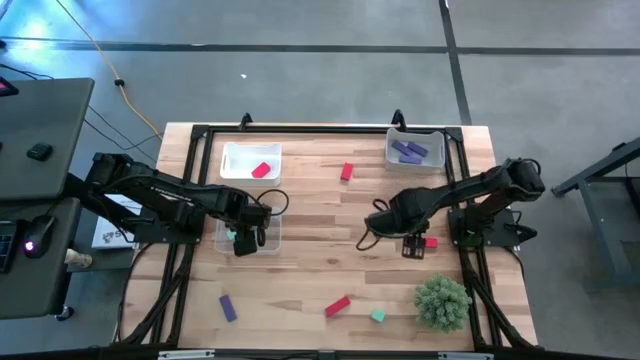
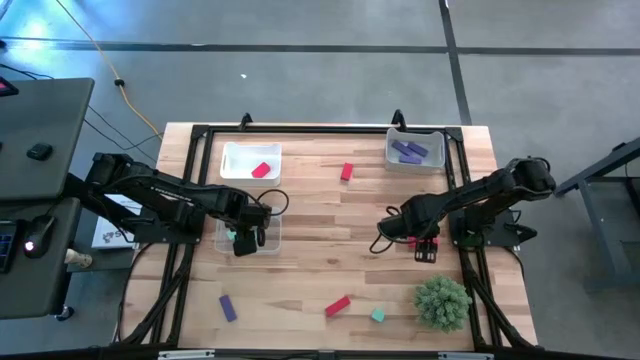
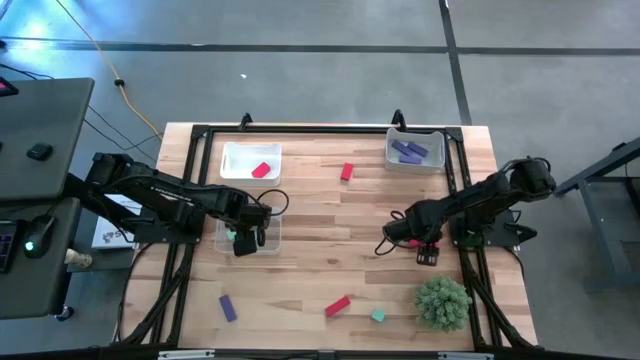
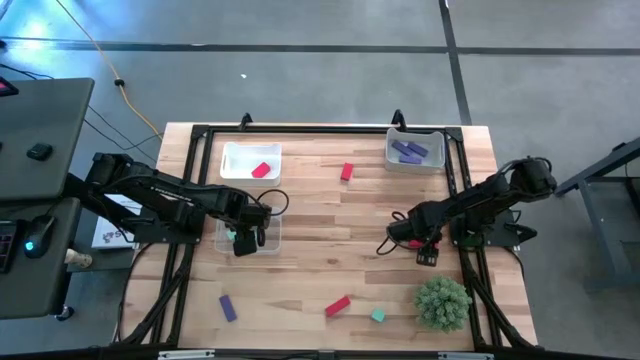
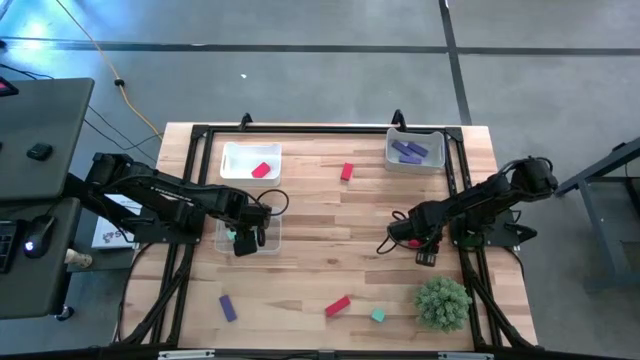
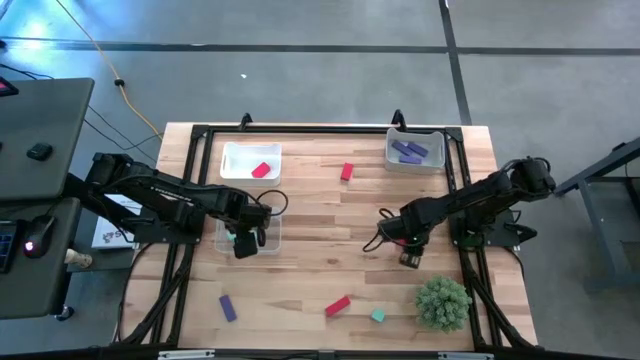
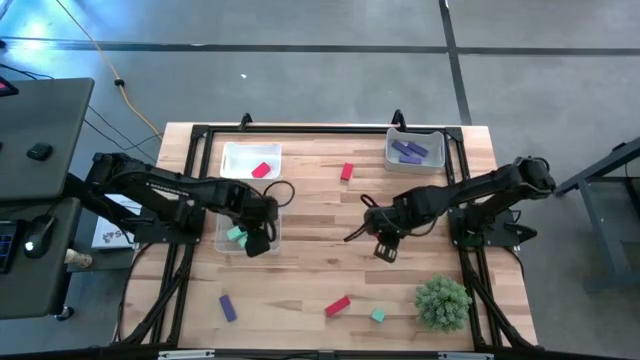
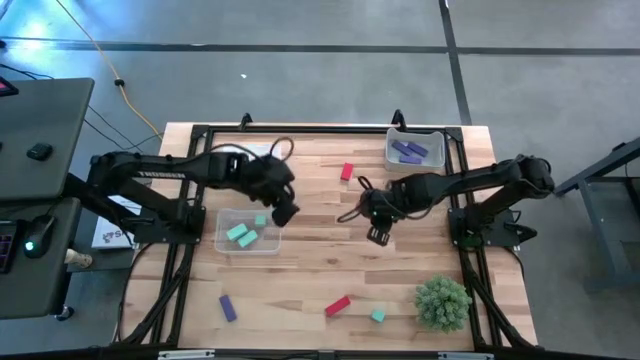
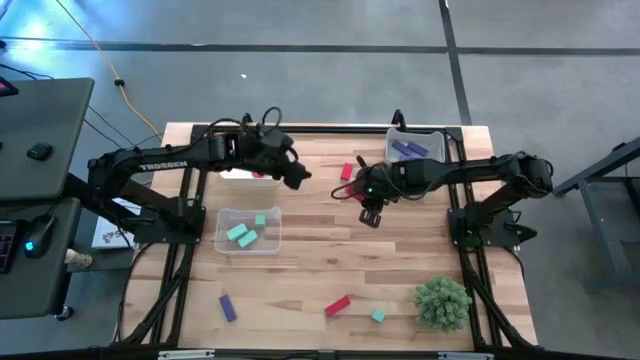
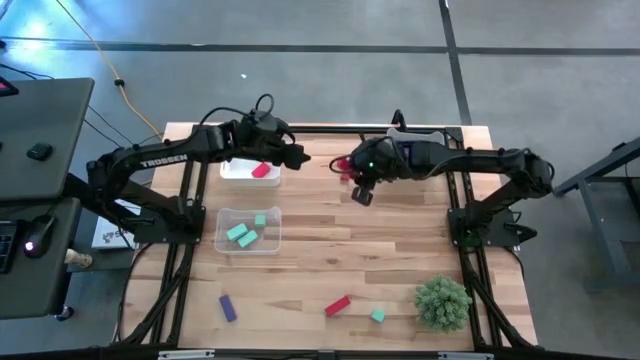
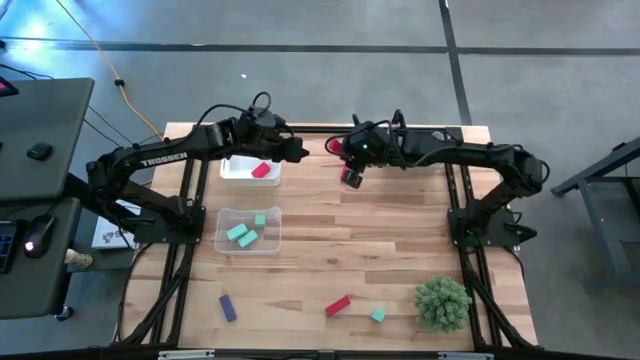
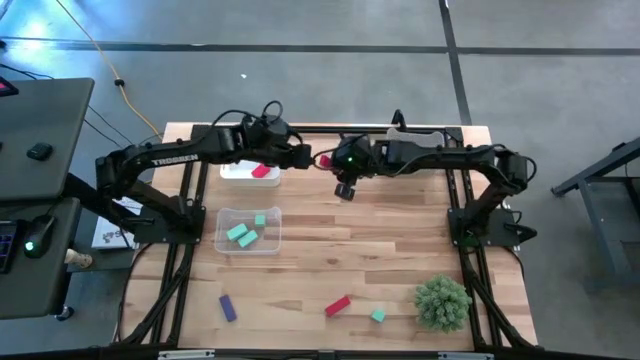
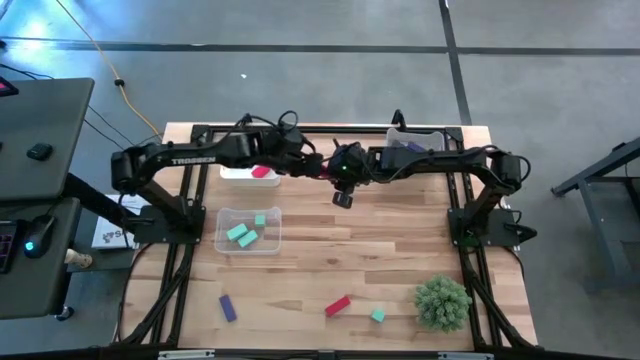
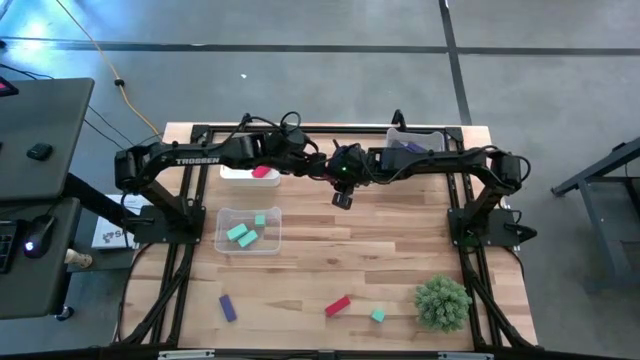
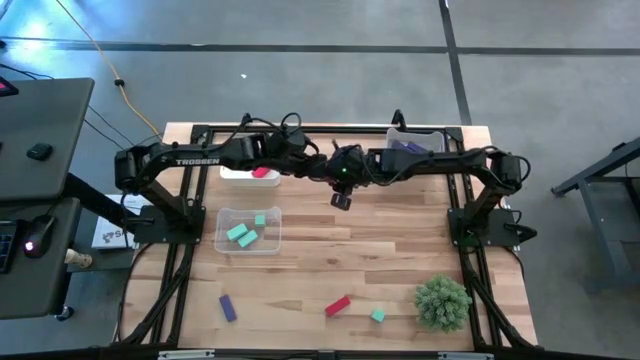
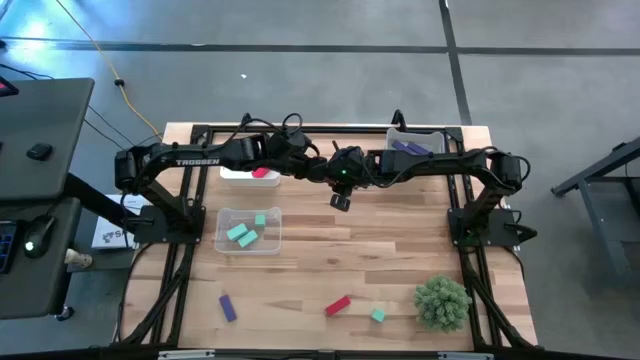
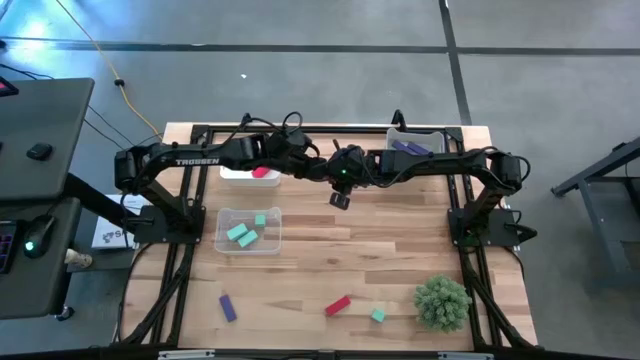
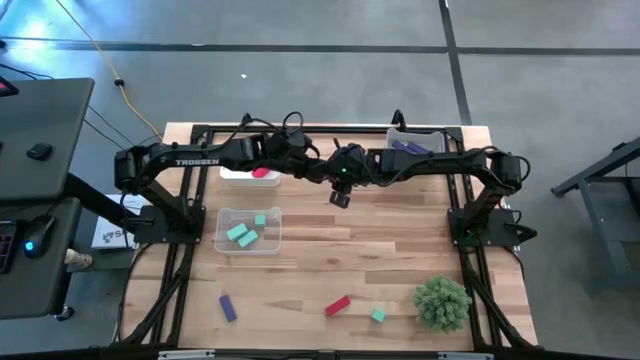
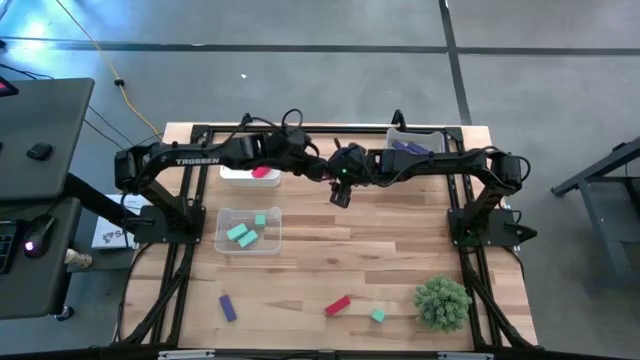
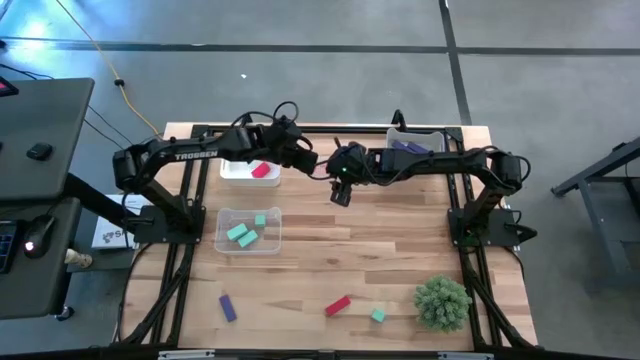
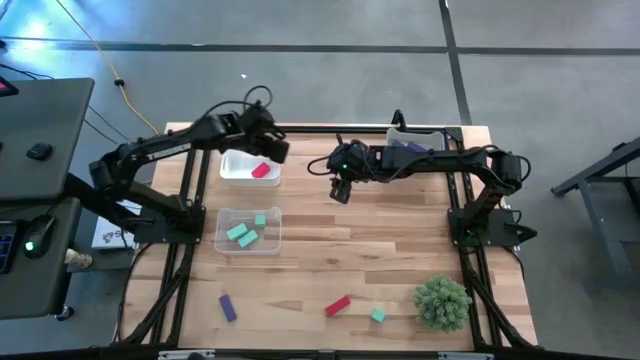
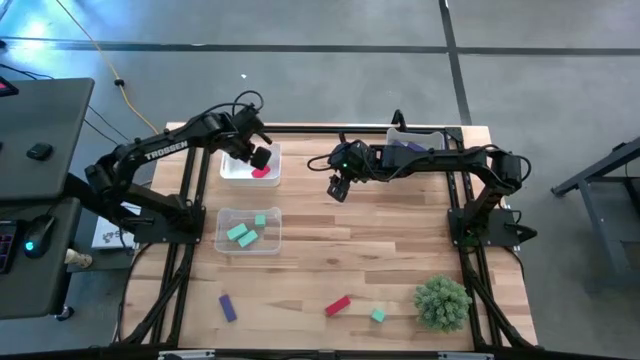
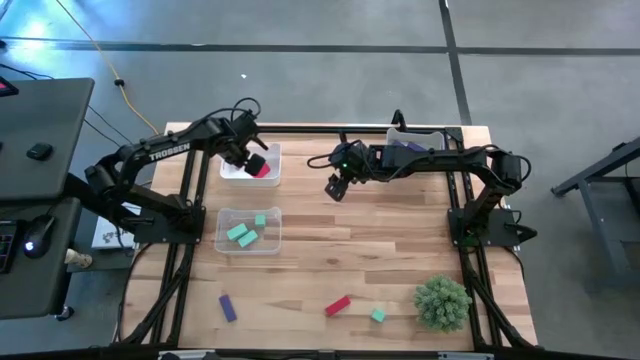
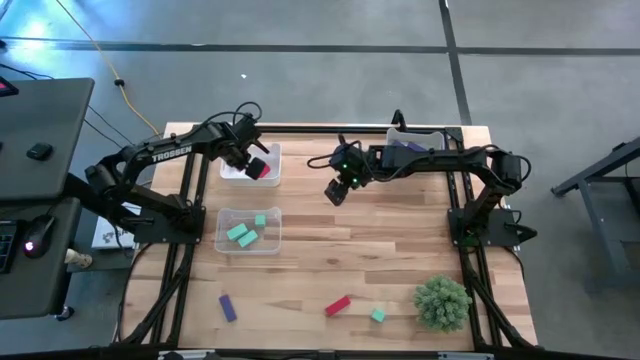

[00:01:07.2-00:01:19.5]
Task: Sort & place blocks by color
Put the red block into the white bin

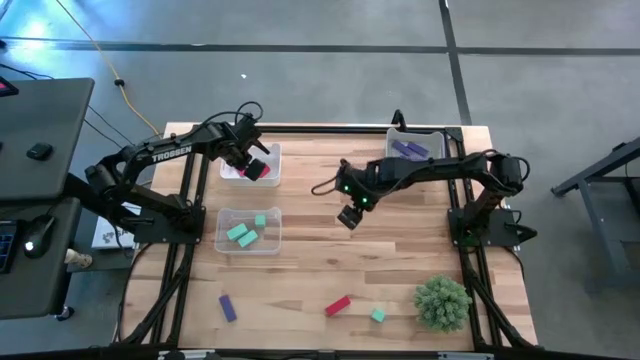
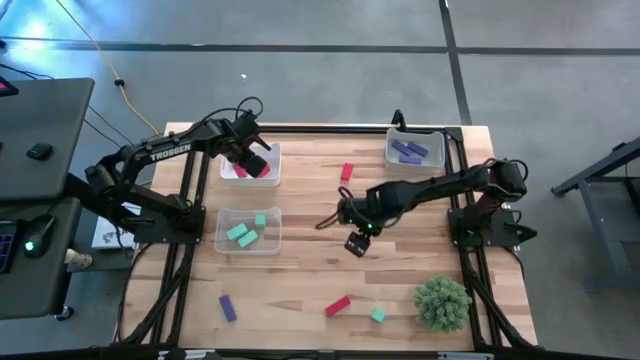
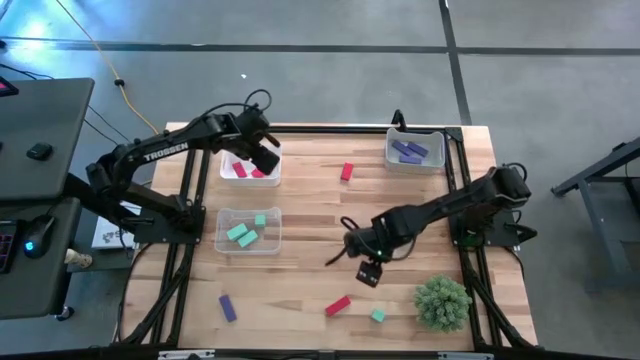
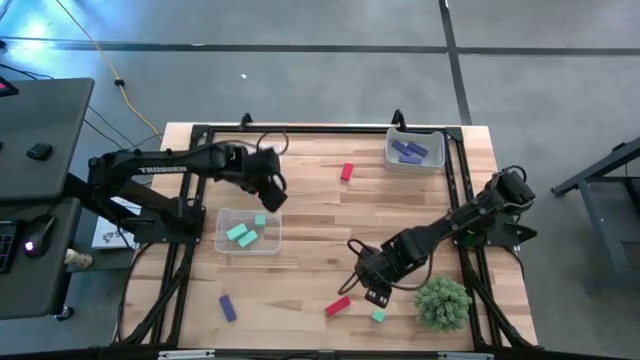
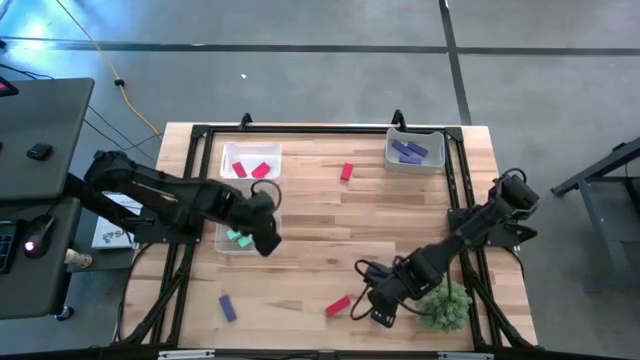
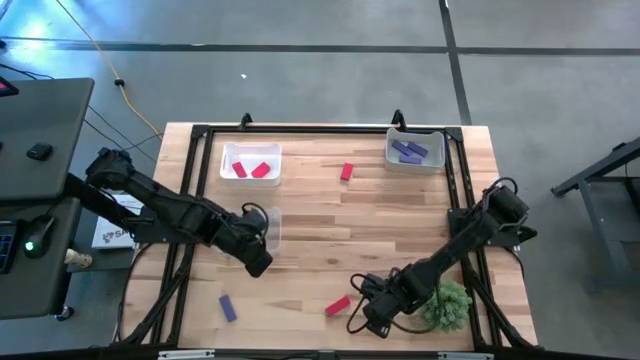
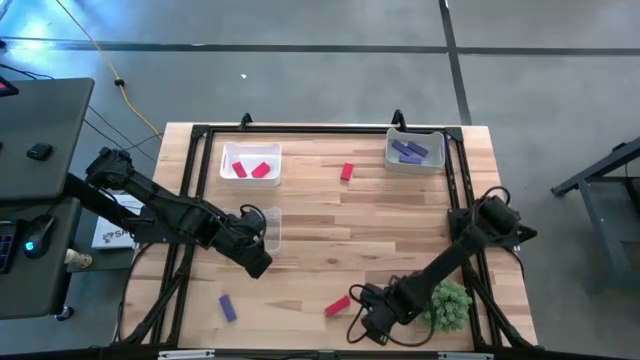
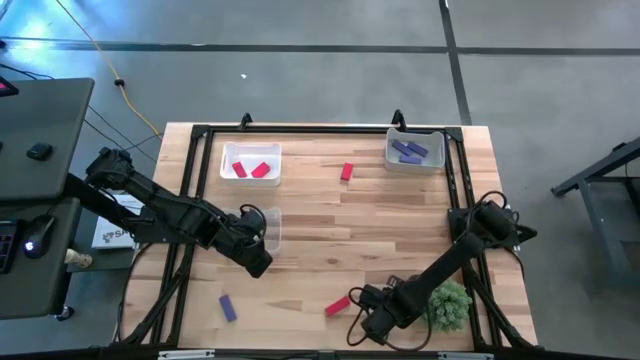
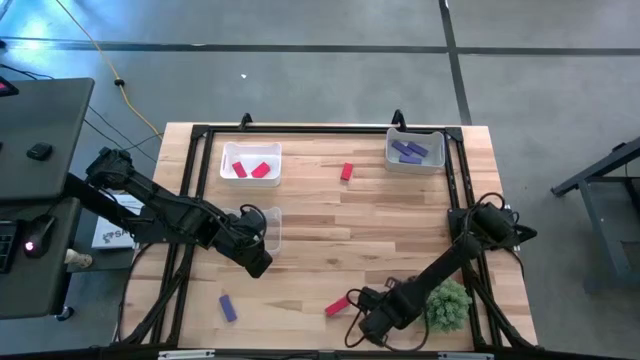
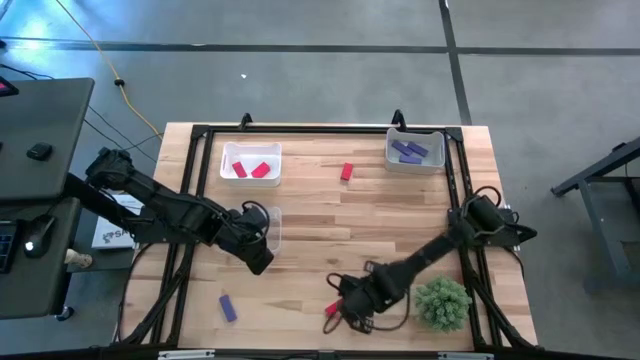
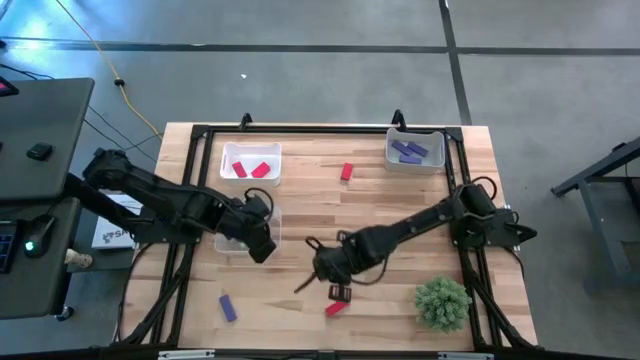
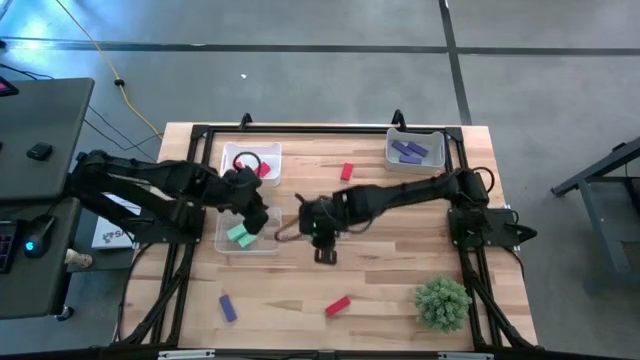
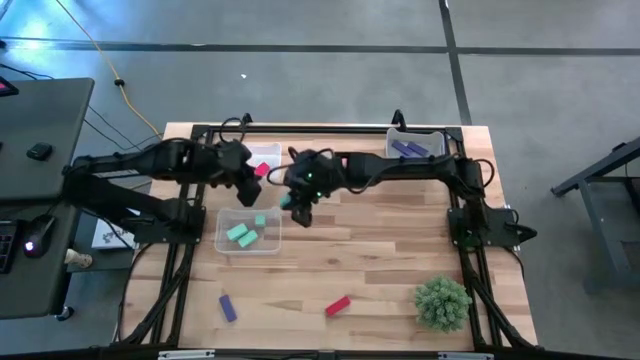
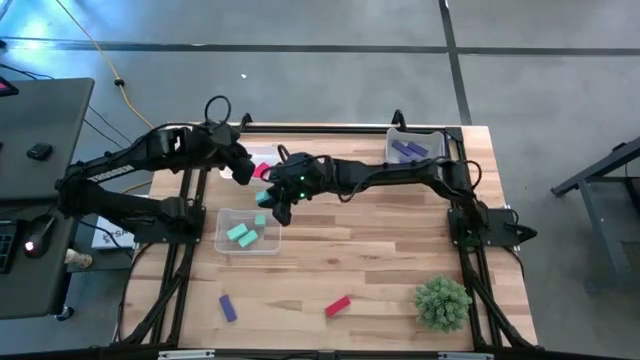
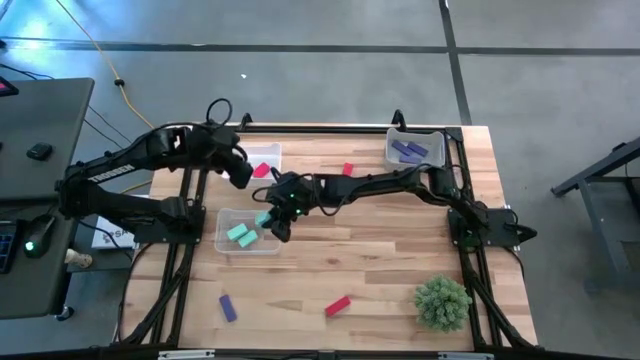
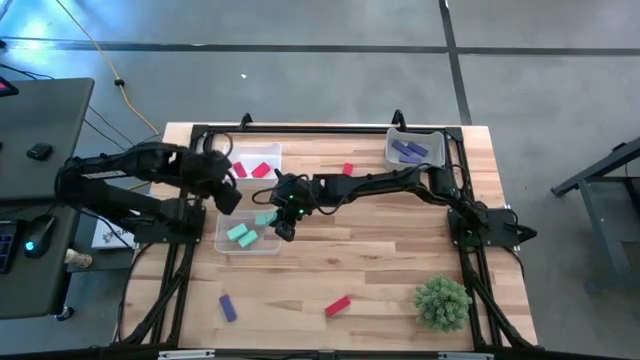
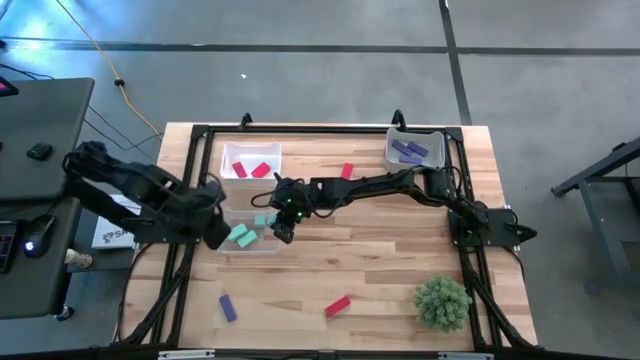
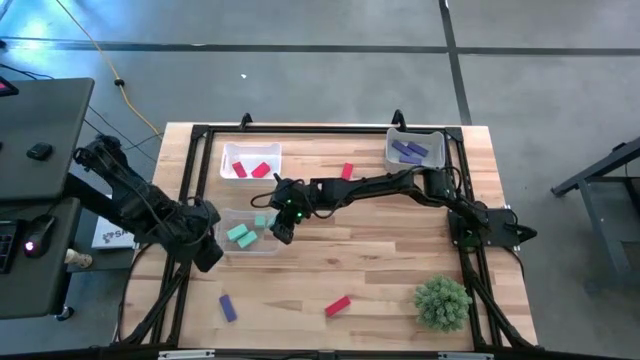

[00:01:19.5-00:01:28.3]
Put the light blue block into the transparent bin

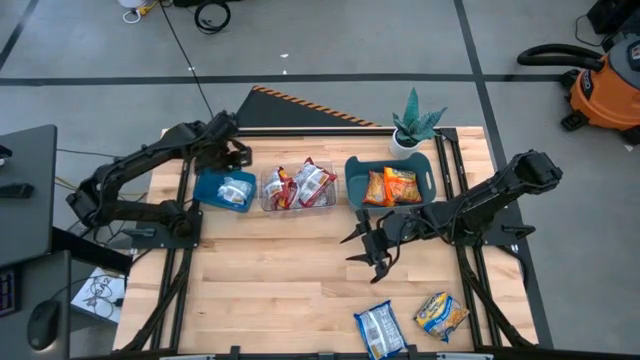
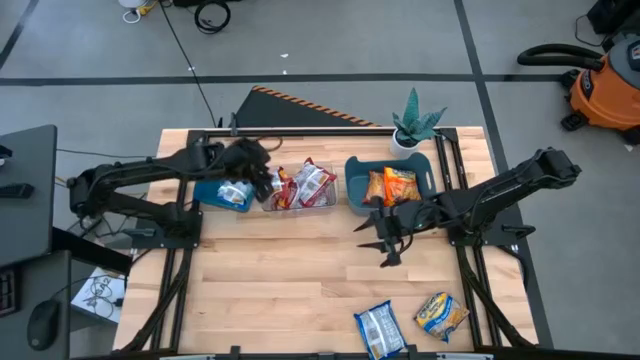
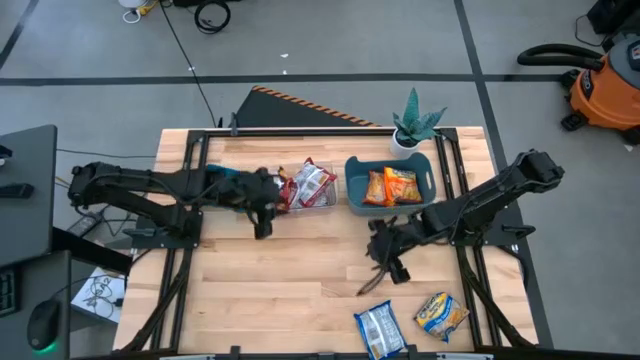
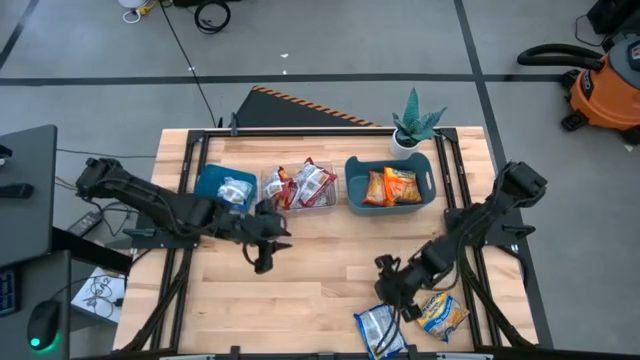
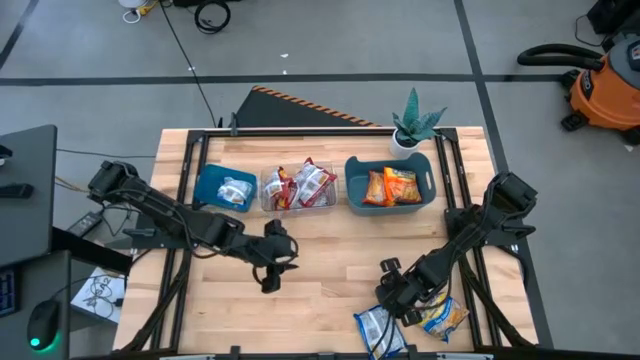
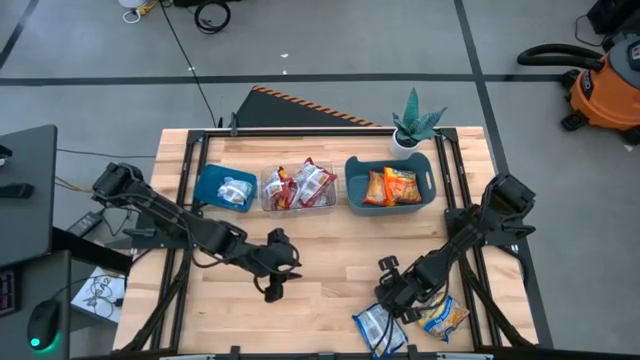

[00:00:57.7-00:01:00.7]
Task: Sort Maruchan noodles
Put the blue noodle pack into the blue bin
